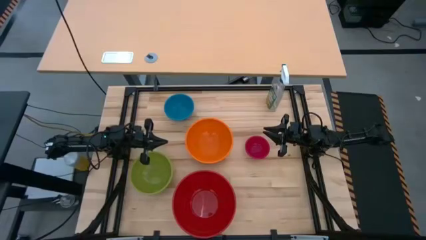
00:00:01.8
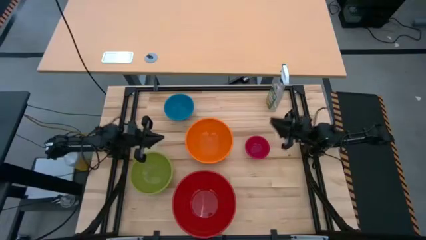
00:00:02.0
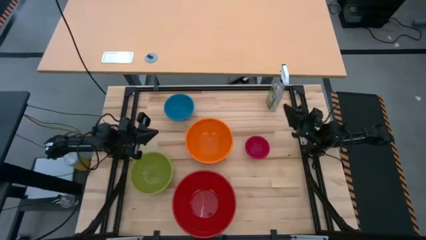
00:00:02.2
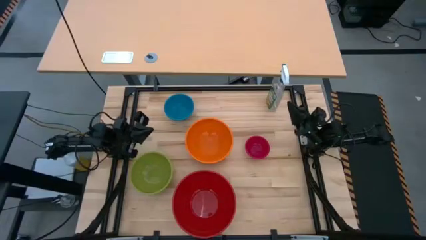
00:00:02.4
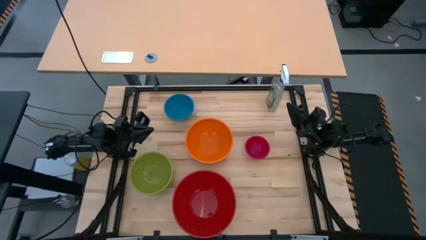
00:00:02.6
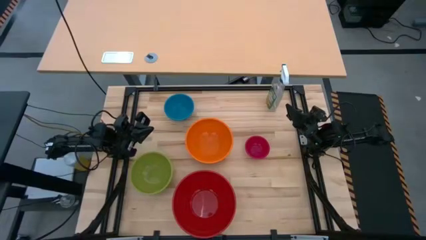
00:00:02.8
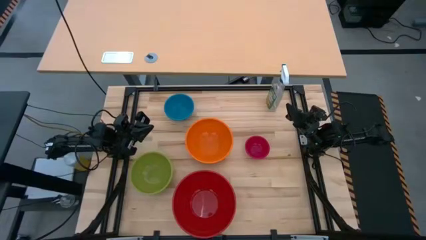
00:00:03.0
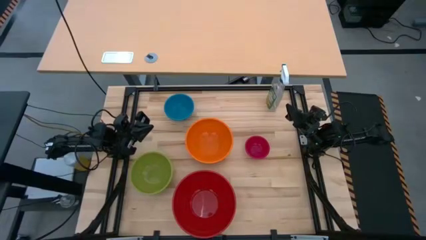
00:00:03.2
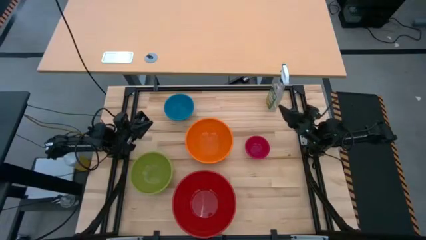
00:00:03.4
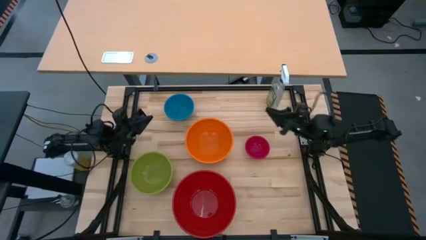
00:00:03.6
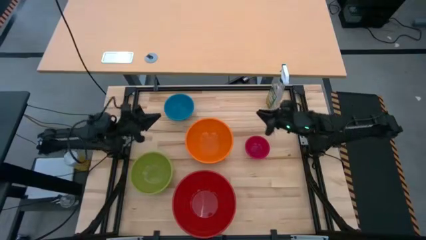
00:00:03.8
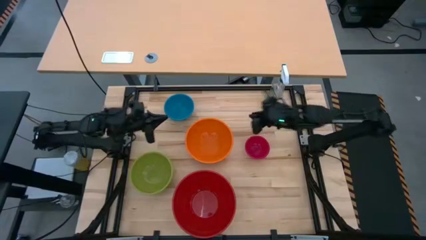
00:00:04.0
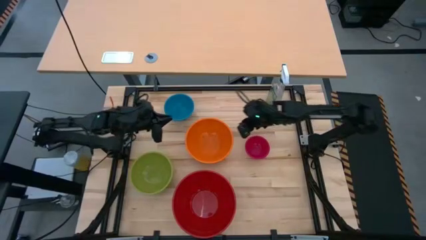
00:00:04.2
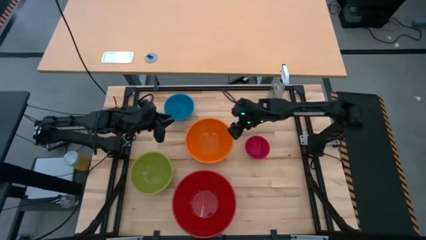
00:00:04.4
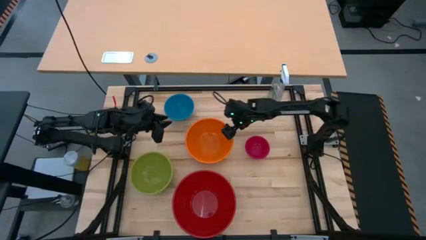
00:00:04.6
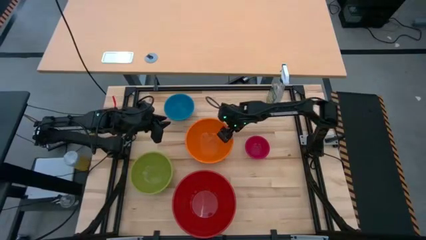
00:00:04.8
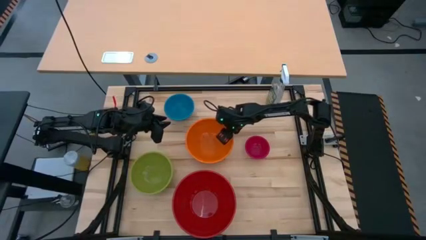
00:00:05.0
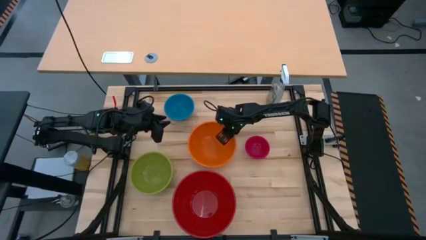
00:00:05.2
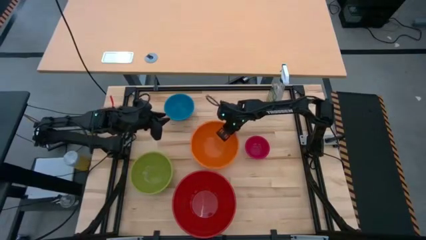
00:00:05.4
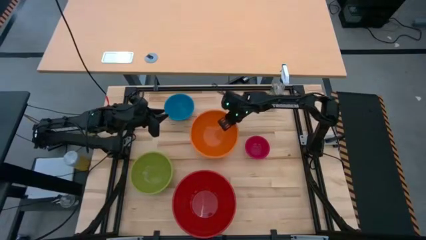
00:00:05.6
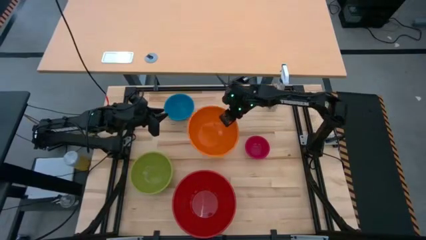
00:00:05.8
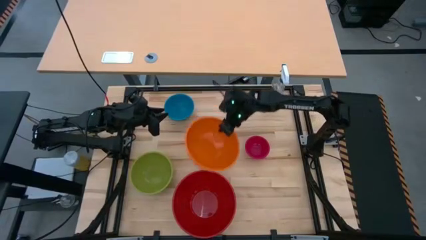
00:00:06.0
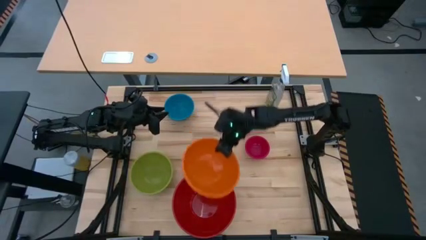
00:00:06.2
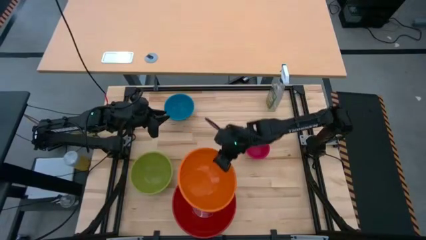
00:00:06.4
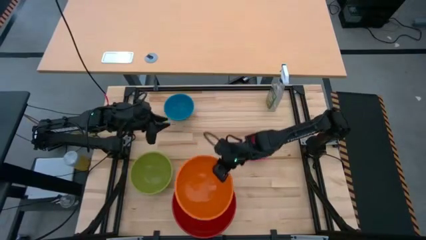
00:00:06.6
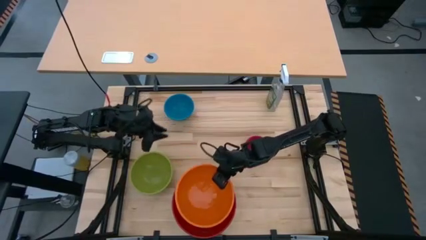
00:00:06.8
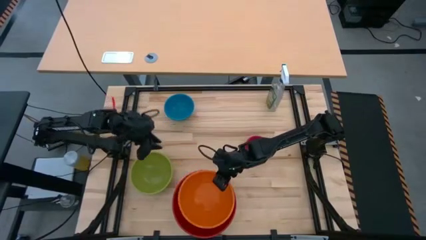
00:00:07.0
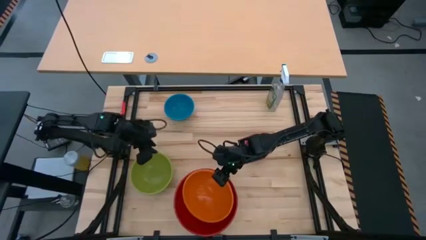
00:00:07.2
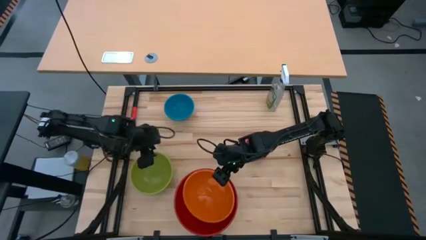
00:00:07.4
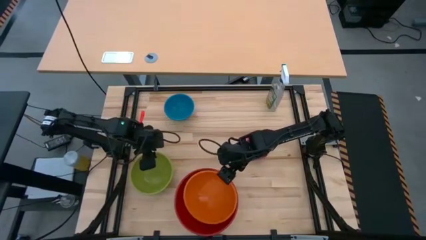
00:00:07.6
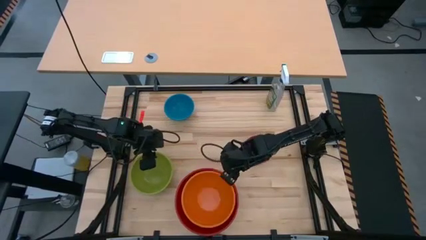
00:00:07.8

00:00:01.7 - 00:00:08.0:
Stack the orange bowl on top of the red bowl

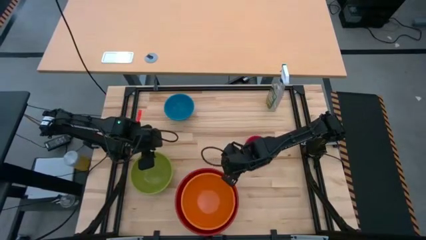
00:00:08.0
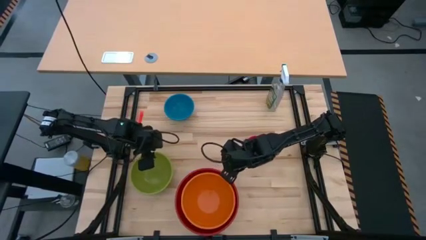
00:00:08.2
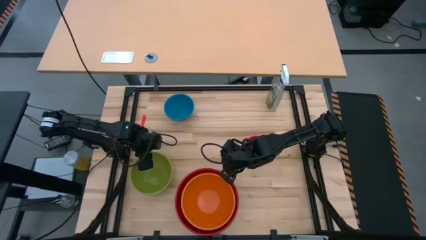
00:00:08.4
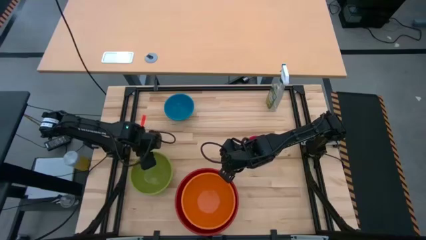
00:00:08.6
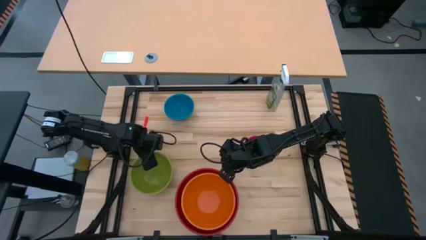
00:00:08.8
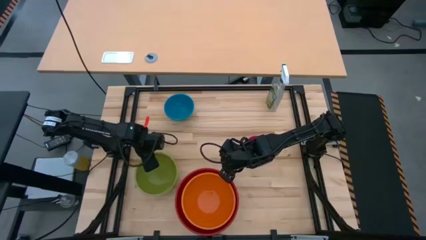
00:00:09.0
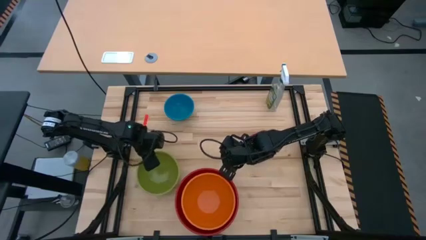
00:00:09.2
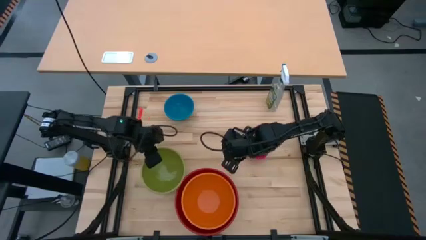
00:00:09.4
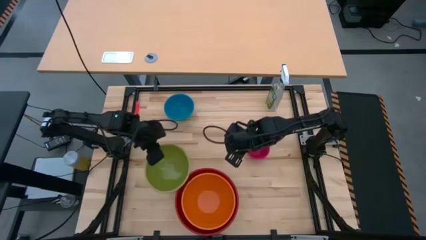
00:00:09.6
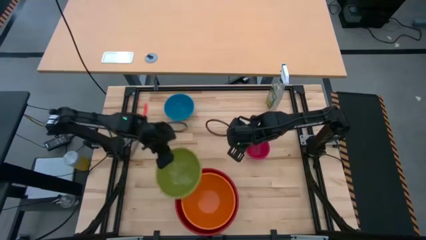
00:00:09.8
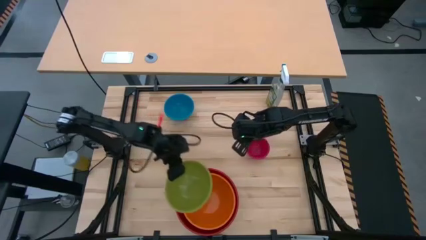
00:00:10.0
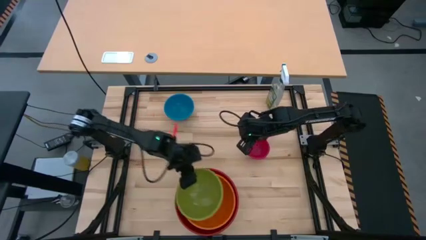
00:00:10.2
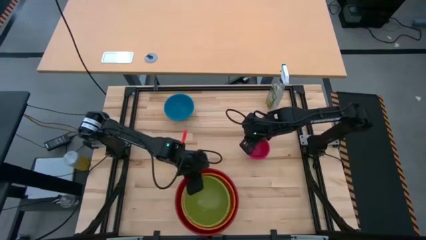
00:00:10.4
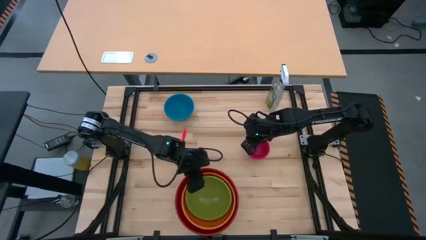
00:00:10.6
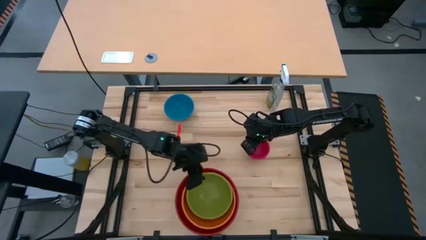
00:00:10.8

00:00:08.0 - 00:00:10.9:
Stack the green bowl on top of the orange bowl

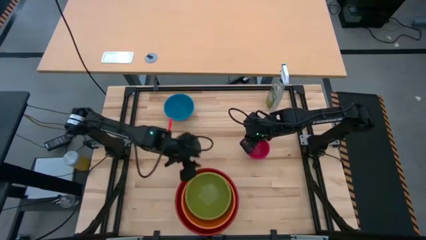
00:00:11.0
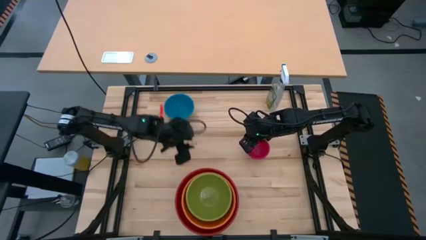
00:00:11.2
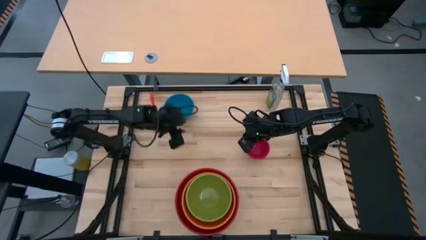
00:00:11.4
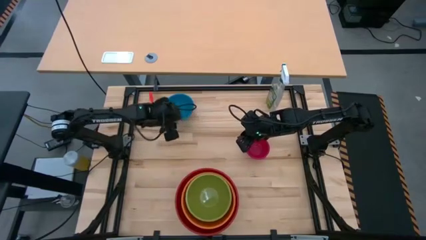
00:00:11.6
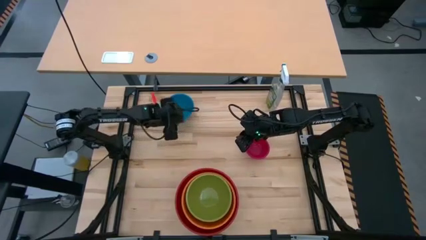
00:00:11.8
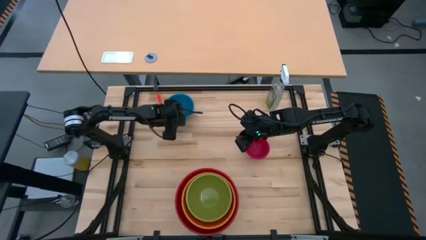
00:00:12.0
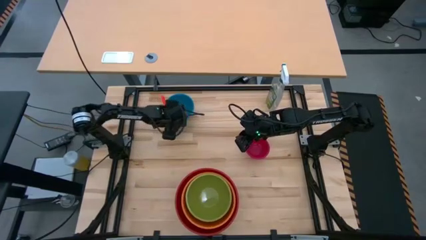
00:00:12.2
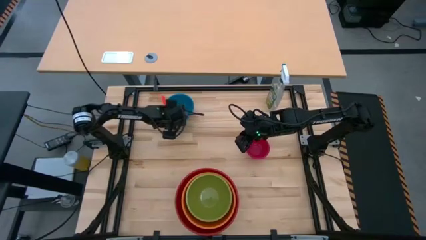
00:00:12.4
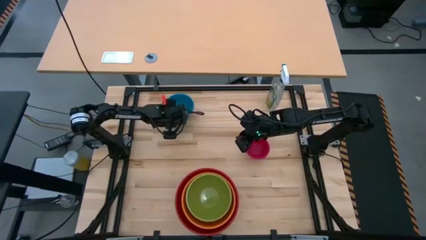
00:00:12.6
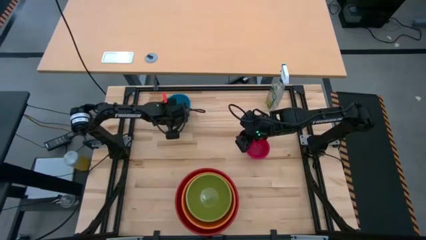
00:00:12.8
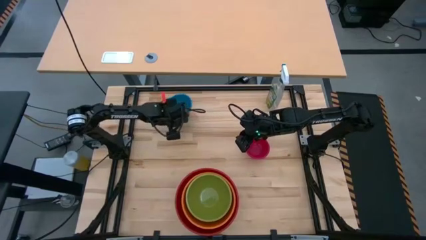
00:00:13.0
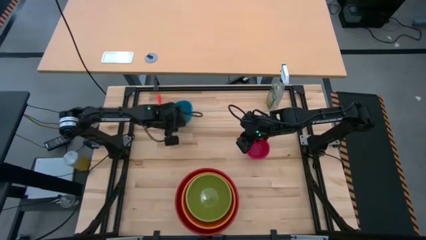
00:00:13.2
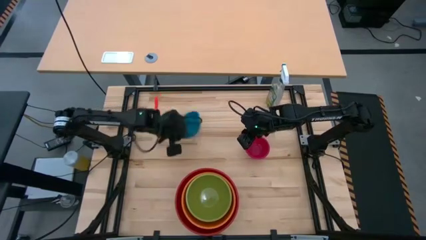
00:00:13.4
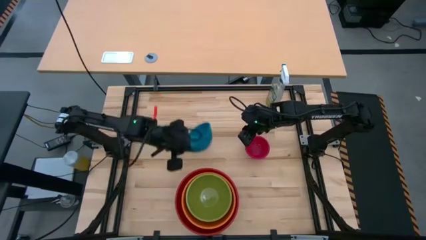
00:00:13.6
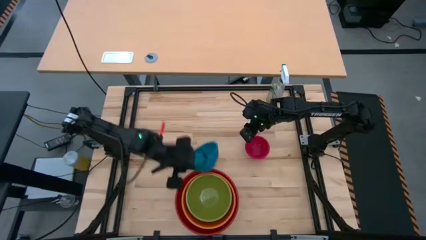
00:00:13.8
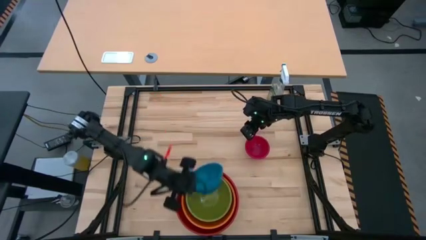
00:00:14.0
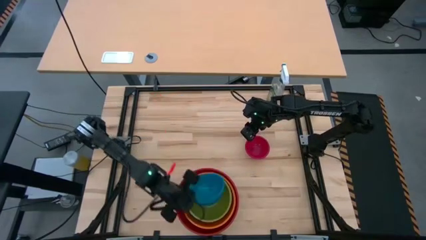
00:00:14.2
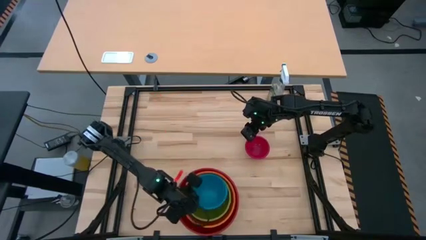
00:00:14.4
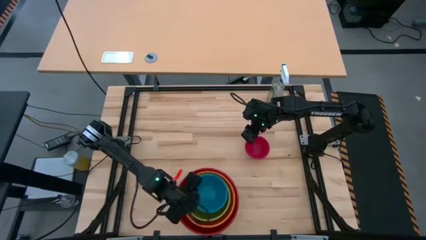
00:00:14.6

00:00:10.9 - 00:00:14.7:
Stack the blue bowl on top of the green bowl

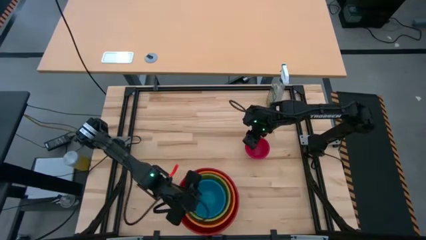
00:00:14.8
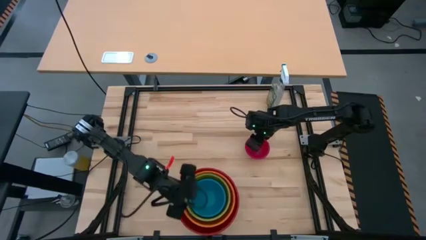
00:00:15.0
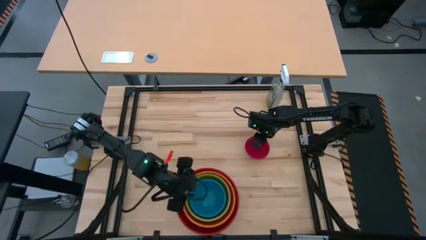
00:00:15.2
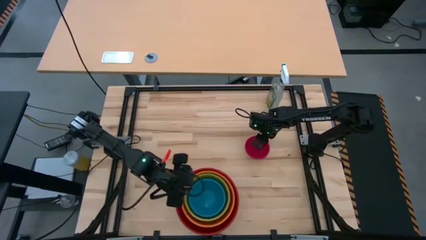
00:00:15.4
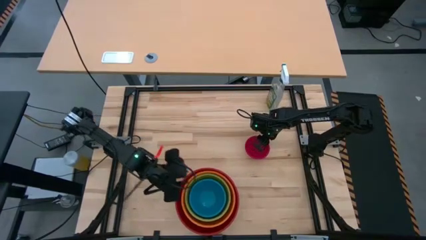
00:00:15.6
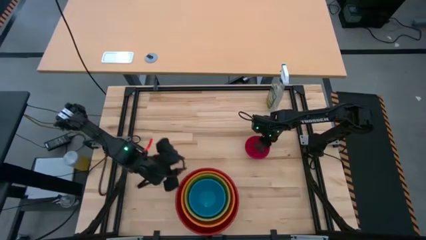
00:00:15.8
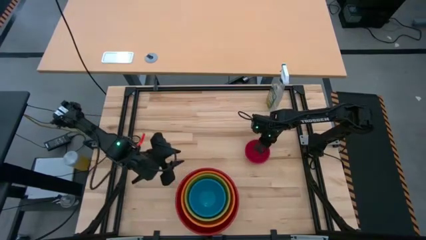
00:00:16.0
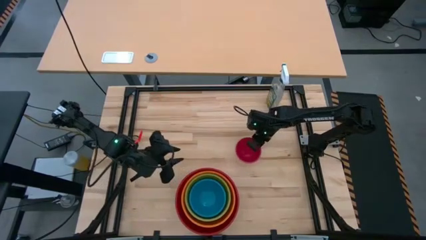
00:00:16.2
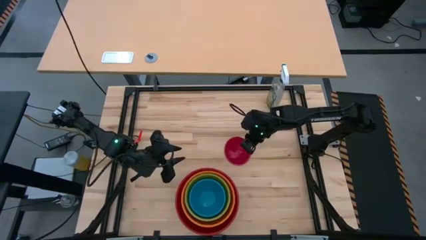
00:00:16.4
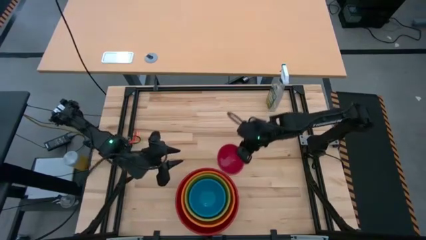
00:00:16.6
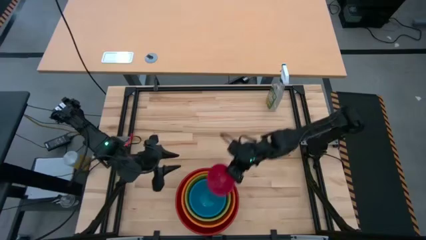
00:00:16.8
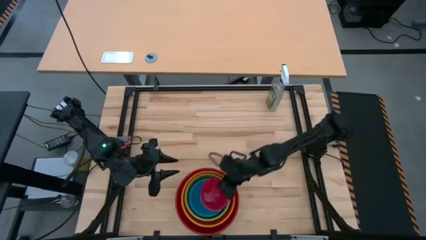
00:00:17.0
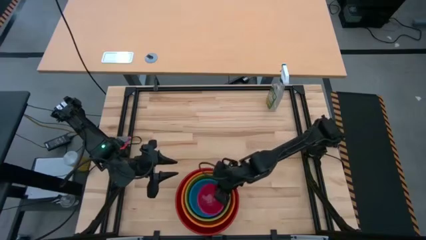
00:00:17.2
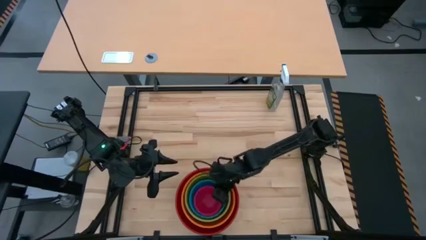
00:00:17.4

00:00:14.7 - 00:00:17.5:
Stack the pink bowl on top of the blue bowl
